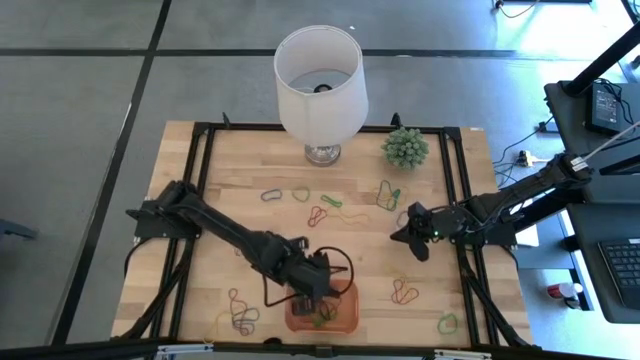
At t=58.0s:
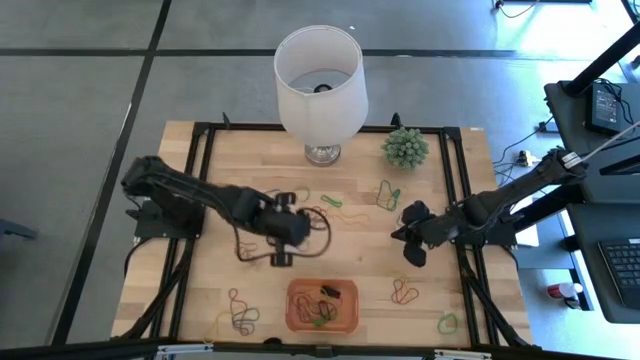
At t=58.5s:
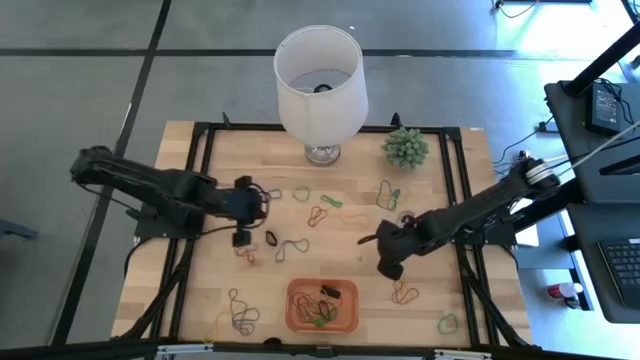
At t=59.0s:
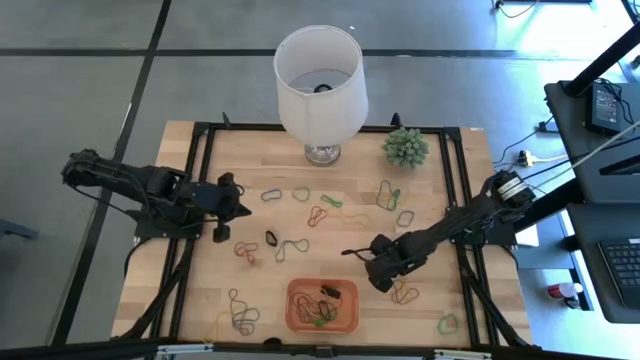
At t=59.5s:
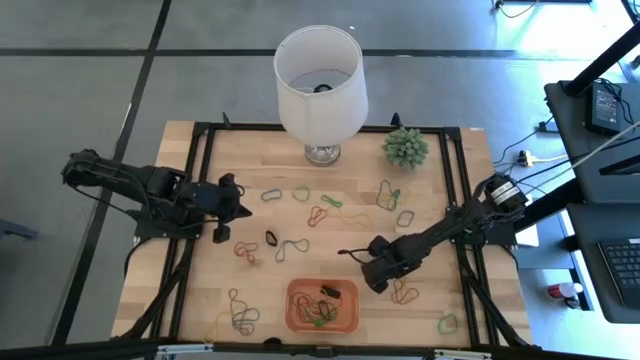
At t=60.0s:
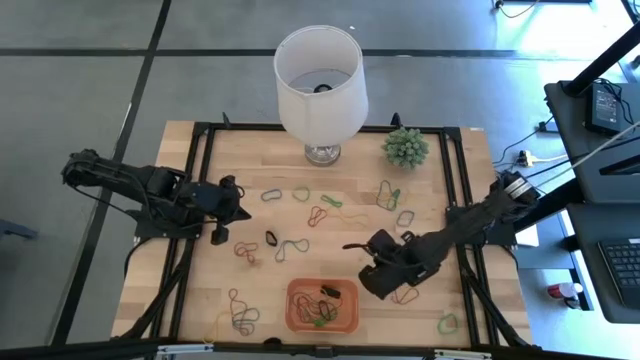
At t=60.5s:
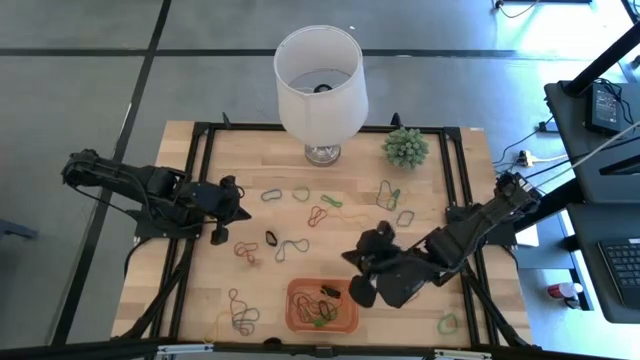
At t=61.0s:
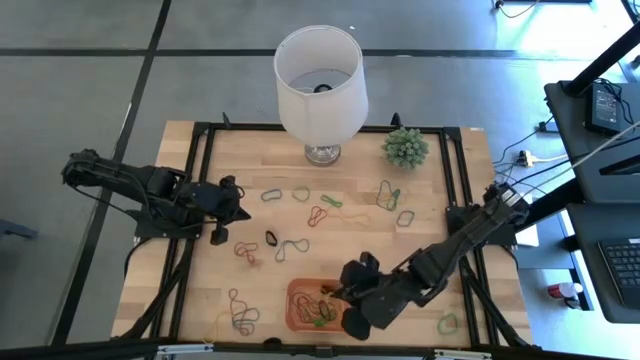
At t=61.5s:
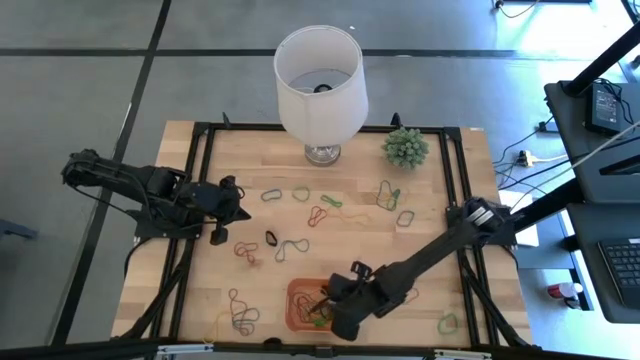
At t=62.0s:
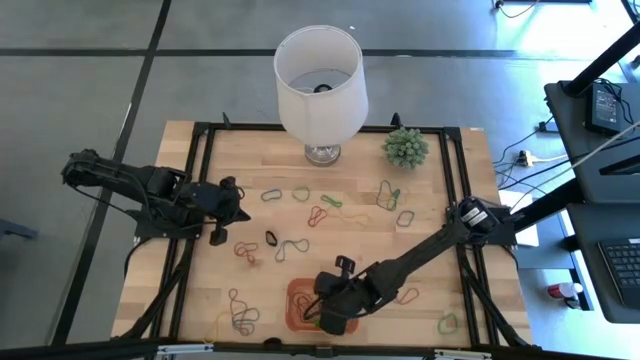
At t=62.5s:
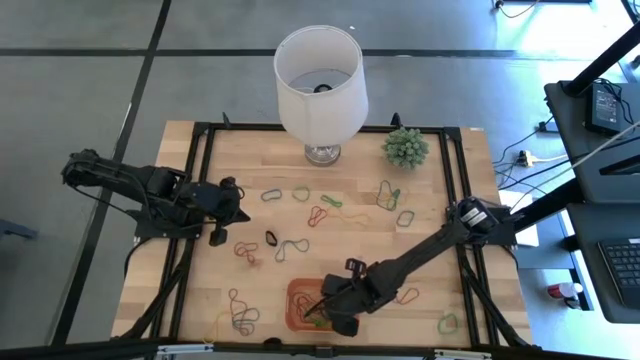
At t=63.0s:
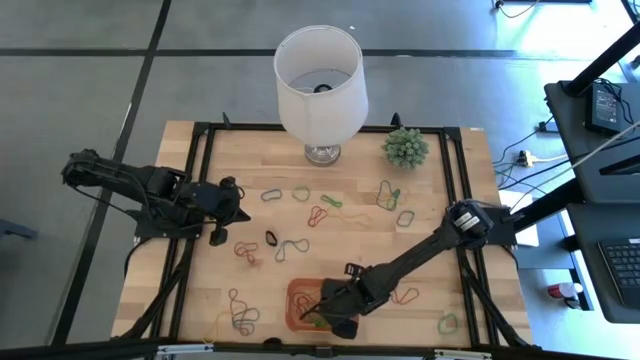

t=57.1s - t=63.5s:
Task: Pick and place rubber bands into bin
Put the yellow rubber band into the orange bin

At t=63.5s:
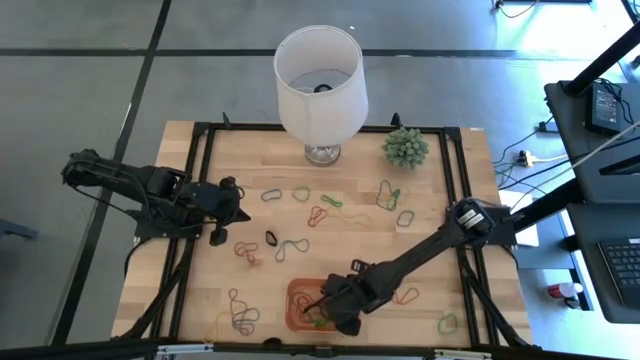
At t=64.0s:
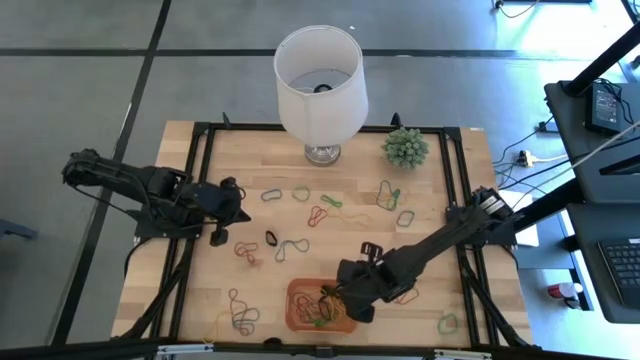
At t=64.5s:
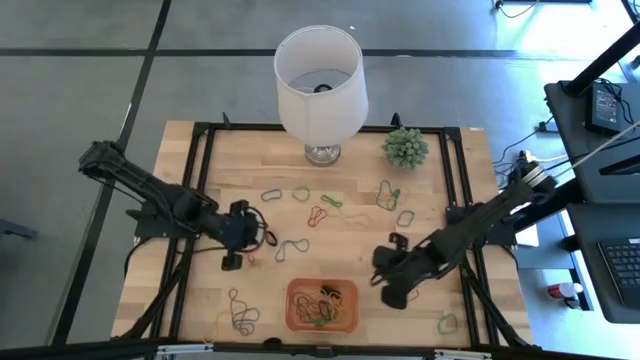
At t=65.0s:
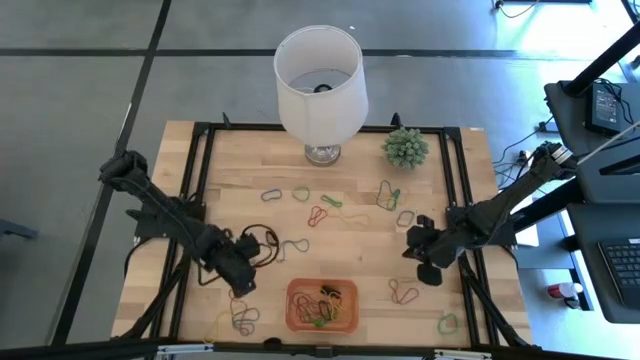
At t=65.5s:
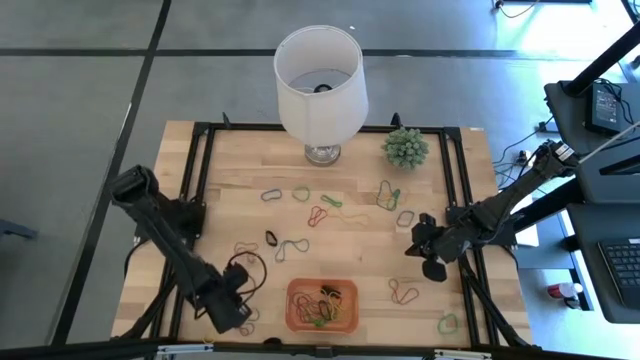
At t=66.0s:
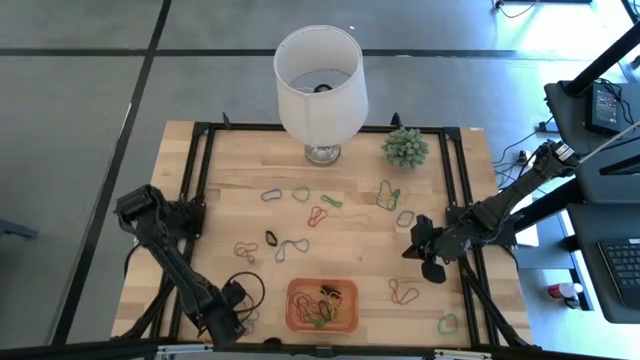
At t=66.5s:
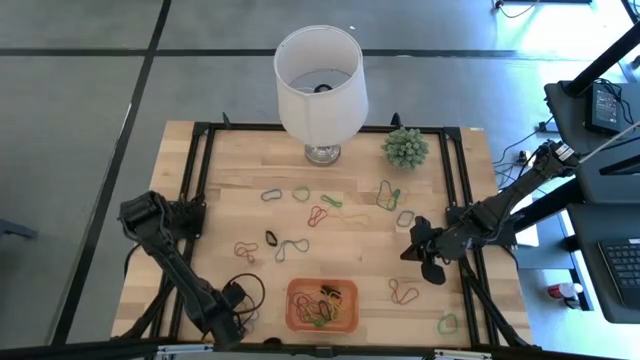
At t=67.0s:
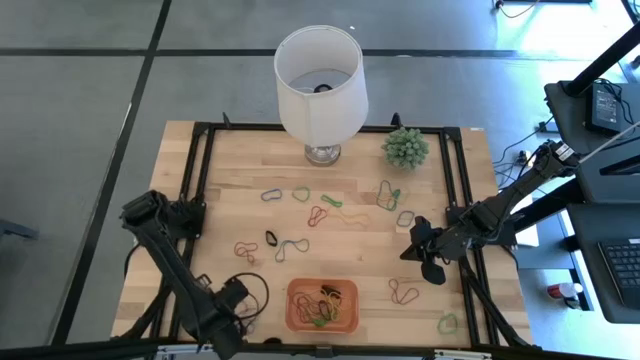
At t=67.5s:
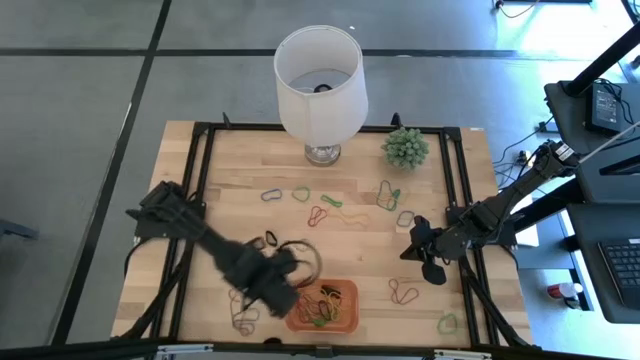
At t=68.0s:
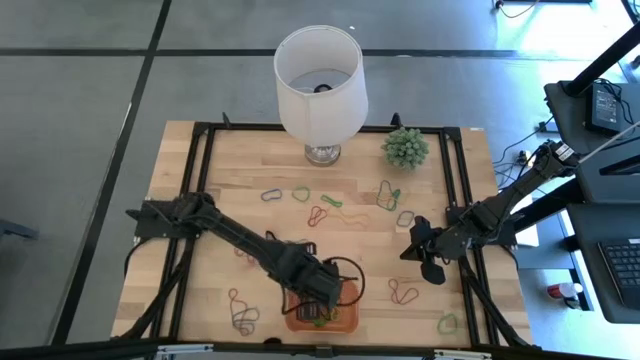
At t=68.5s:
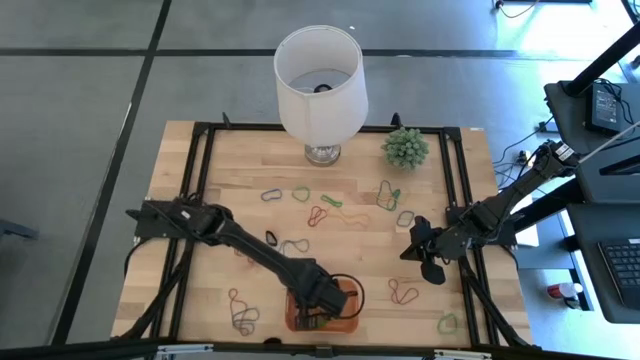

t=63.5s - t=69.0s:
Put the yellow rubber band into the orange bin

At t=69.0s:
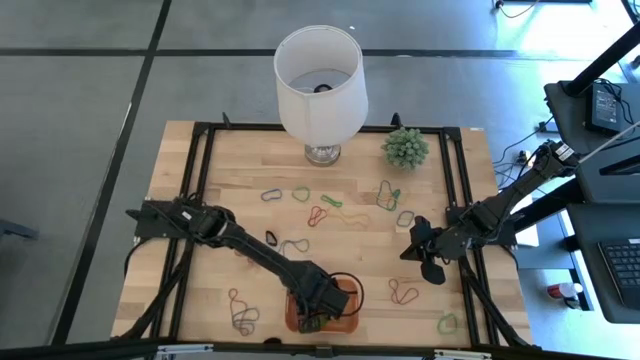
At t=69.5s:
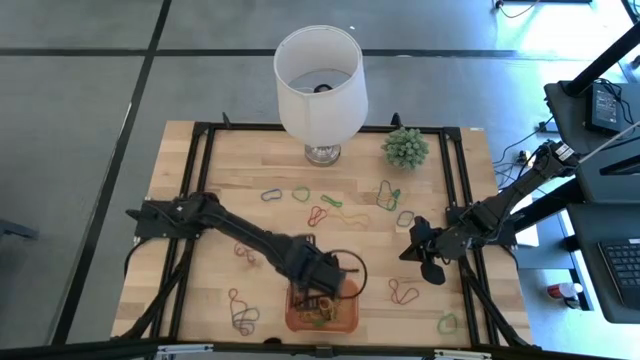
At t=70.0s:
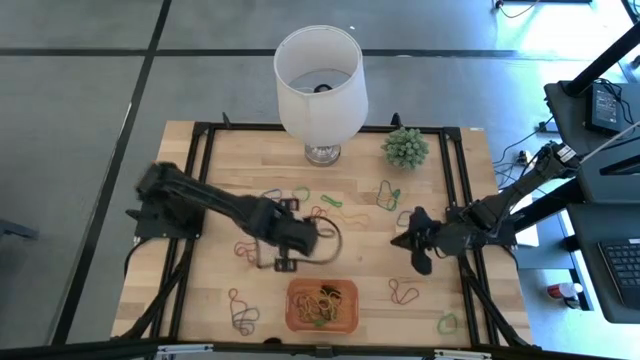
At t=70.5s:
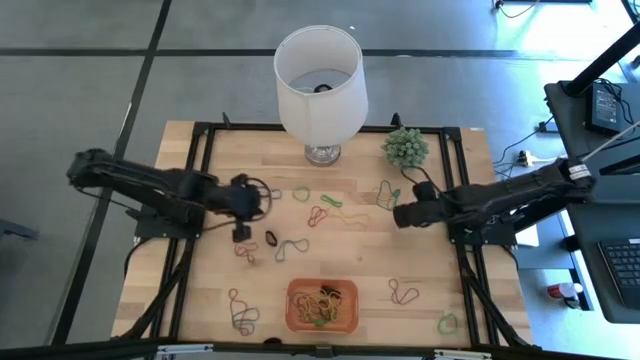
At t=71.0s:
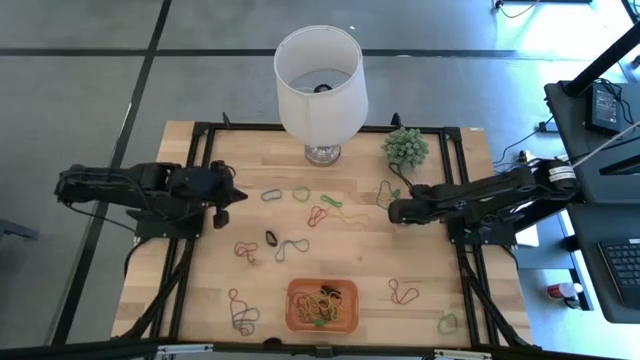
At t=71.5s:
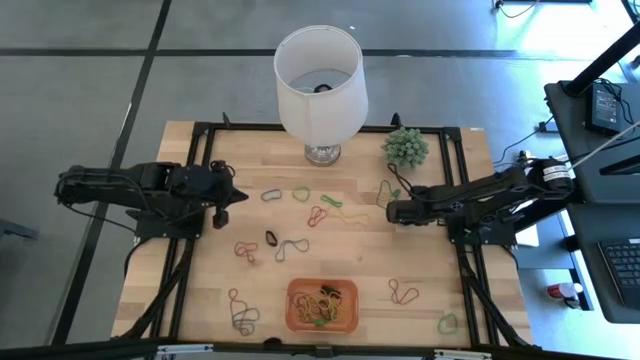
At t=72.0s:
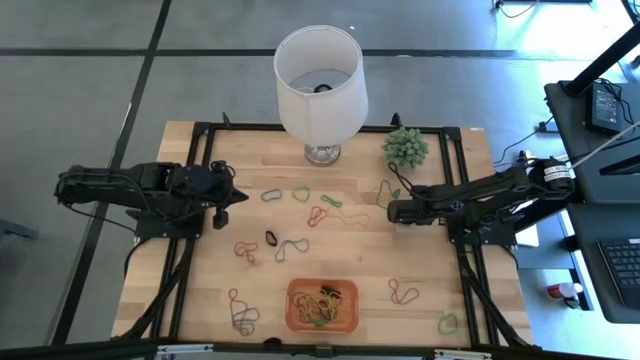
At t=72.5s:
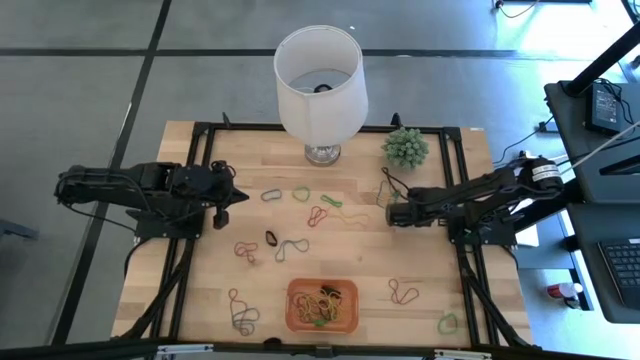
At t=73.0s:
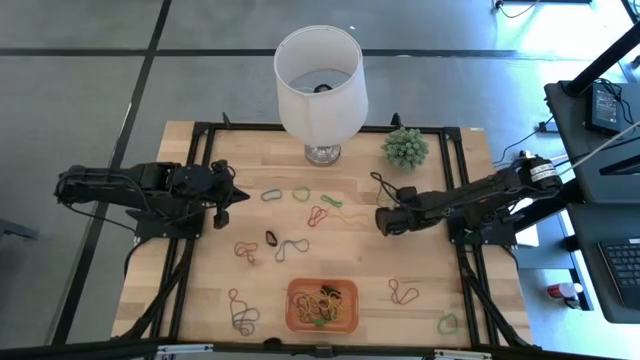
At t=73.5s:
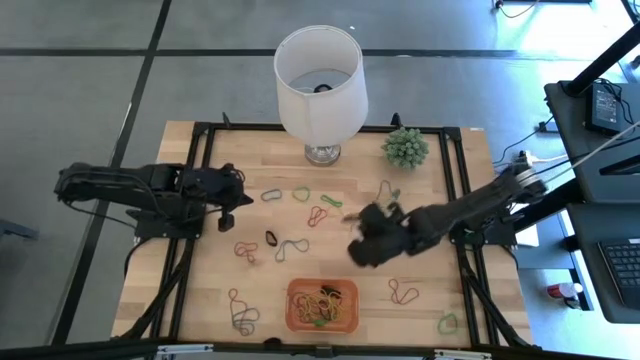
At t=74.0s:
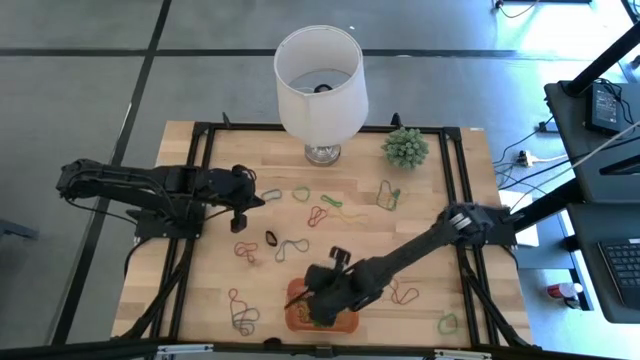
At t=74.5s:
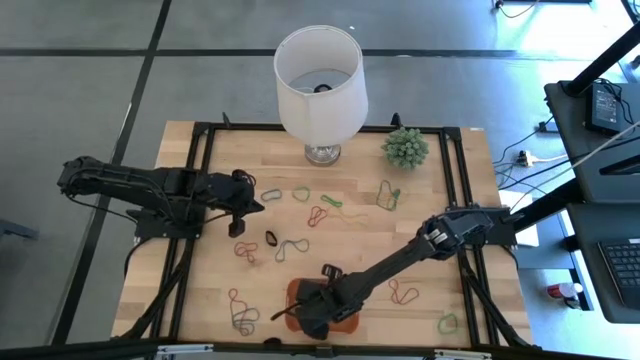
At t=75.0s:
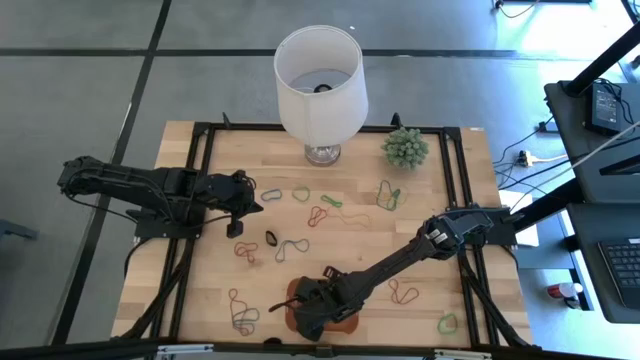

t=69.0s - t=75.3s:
Put the blue rubber band into the orange bin

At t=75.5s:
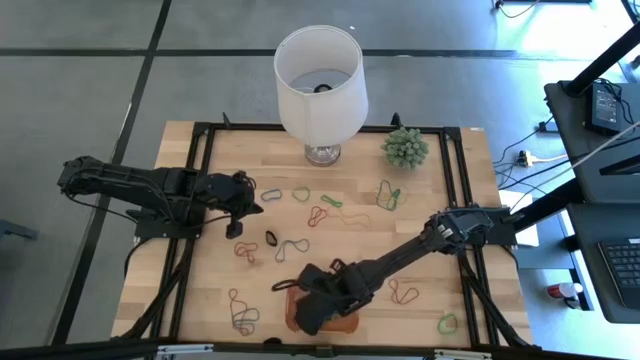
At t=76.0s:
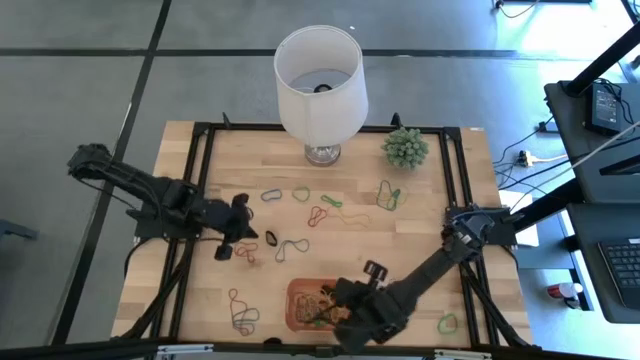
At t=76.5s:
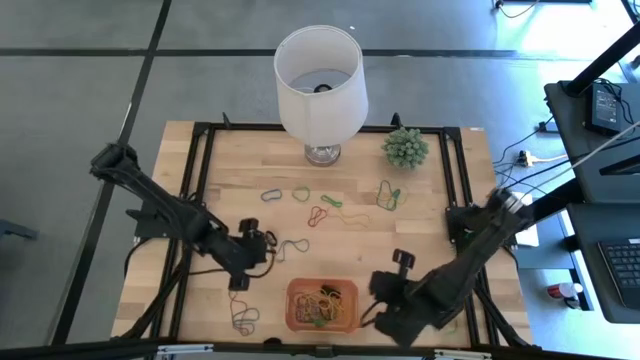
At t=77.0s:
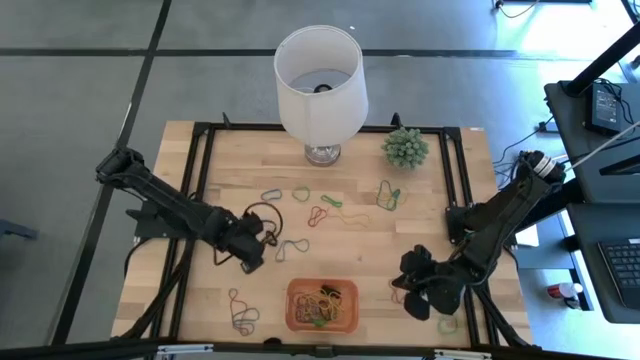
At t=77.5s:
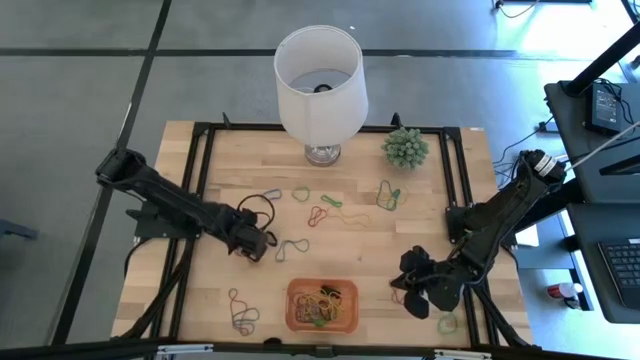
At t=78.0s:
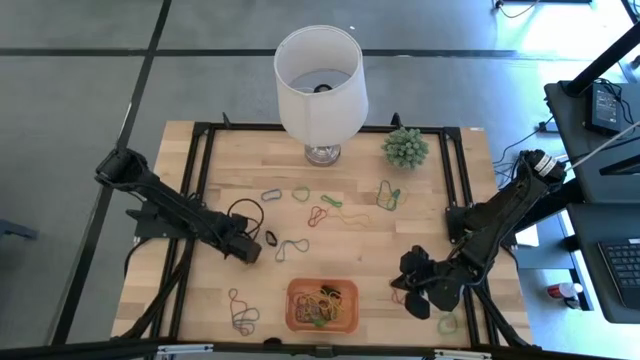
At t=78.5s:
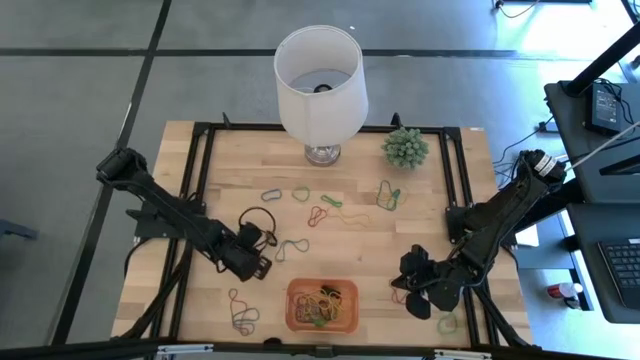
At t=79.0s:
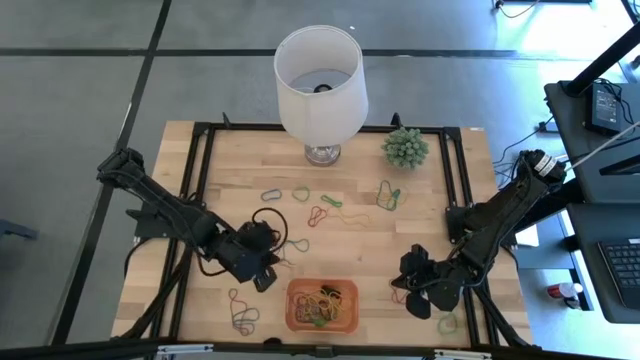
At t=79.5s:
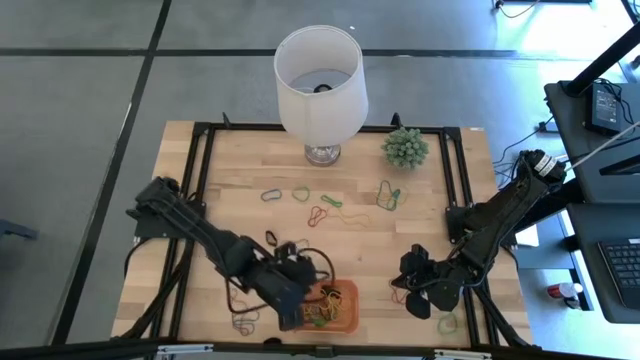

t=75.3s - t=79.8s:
Put the red rubber band into the orange bin
